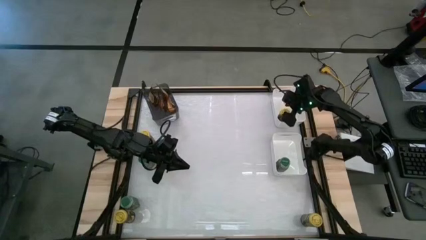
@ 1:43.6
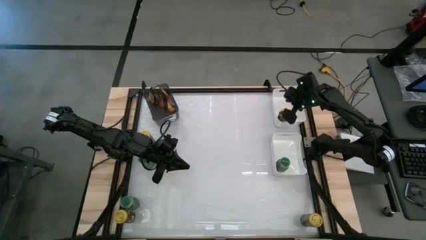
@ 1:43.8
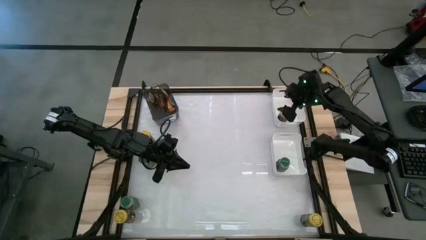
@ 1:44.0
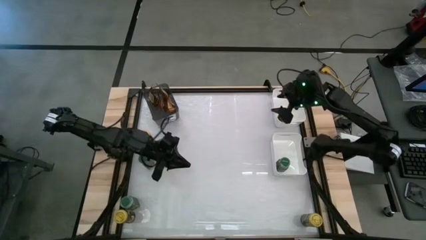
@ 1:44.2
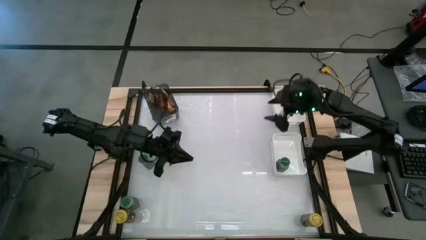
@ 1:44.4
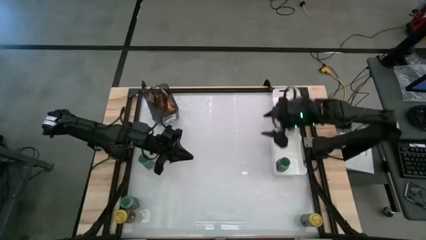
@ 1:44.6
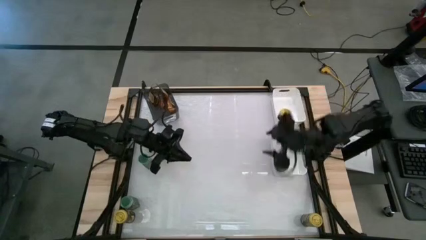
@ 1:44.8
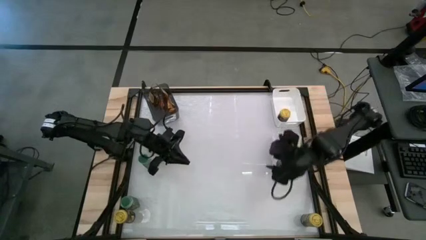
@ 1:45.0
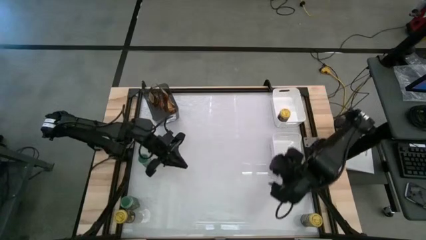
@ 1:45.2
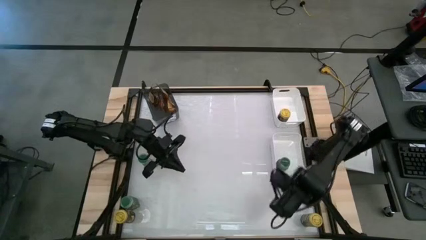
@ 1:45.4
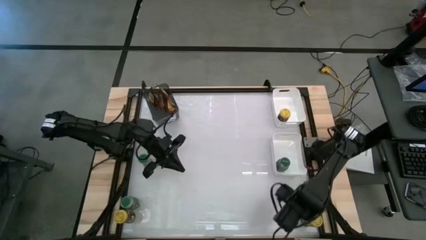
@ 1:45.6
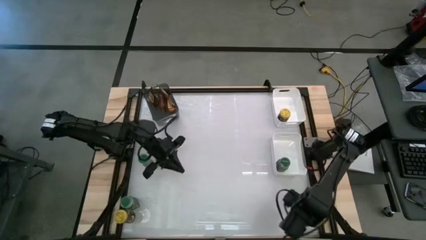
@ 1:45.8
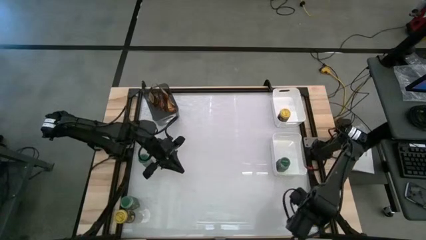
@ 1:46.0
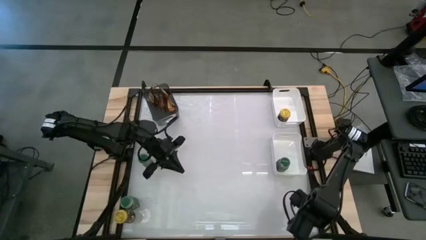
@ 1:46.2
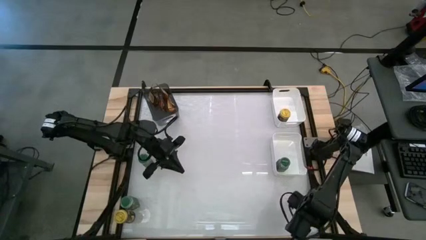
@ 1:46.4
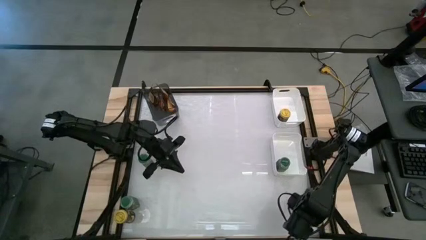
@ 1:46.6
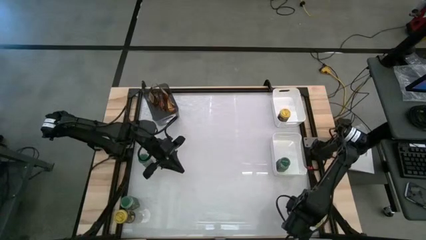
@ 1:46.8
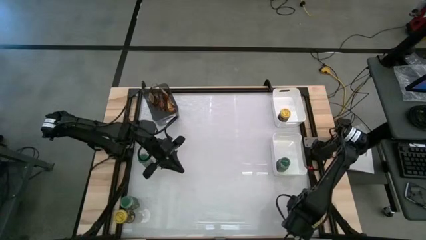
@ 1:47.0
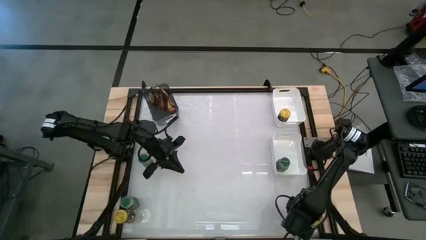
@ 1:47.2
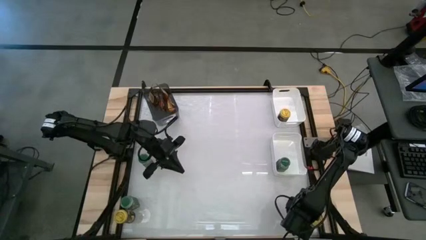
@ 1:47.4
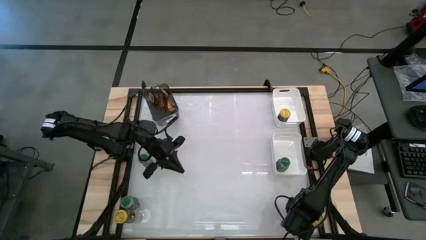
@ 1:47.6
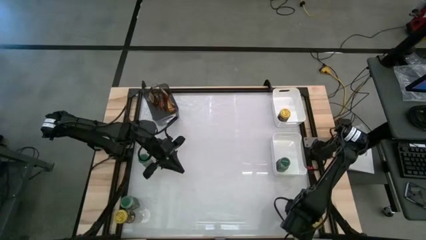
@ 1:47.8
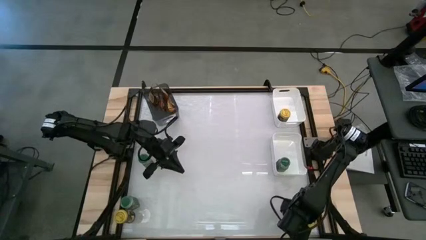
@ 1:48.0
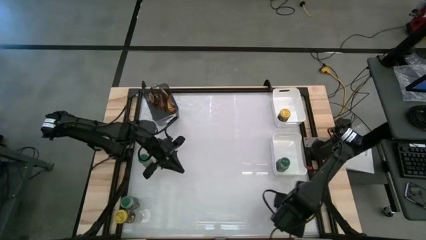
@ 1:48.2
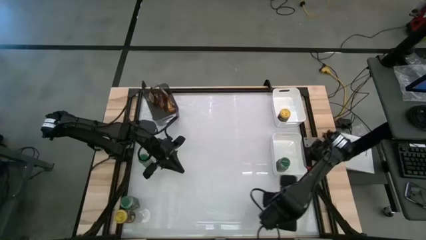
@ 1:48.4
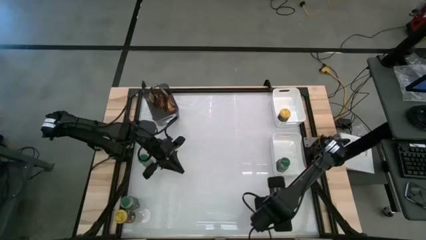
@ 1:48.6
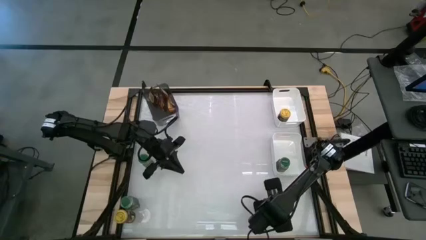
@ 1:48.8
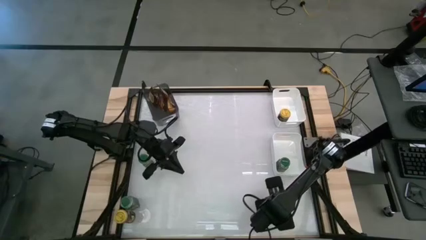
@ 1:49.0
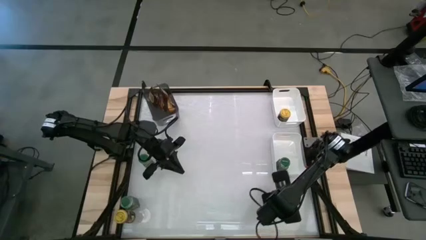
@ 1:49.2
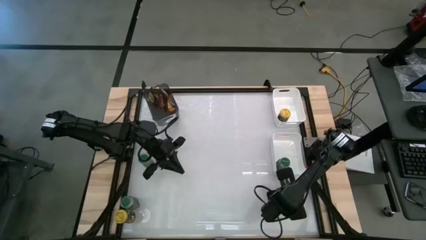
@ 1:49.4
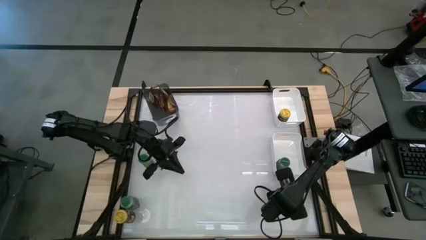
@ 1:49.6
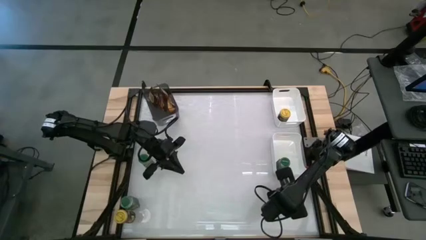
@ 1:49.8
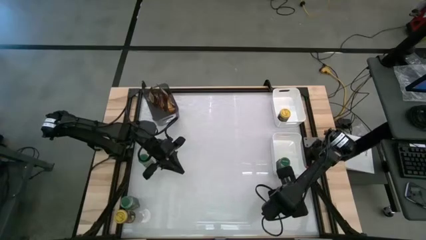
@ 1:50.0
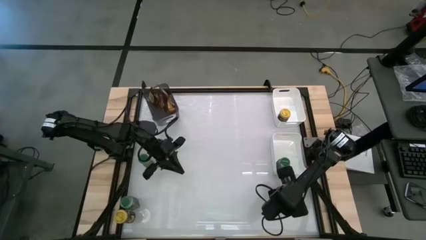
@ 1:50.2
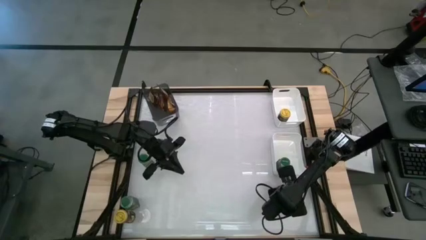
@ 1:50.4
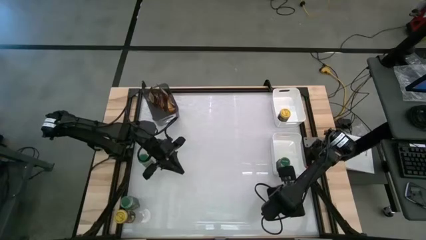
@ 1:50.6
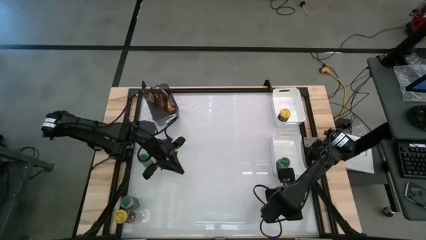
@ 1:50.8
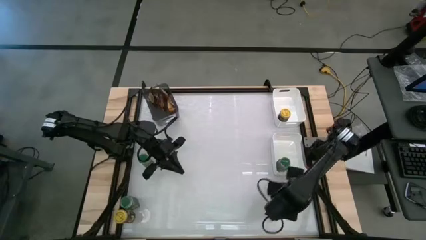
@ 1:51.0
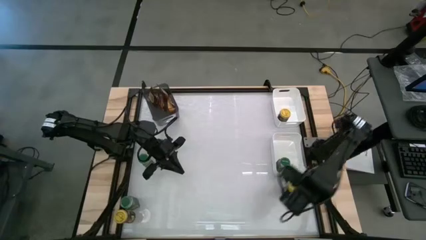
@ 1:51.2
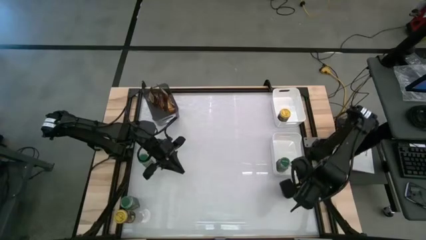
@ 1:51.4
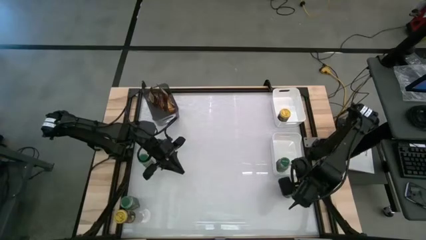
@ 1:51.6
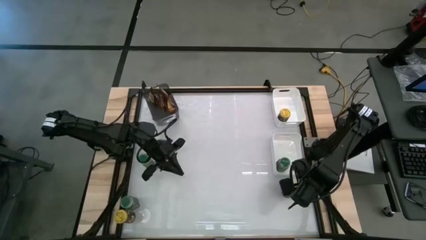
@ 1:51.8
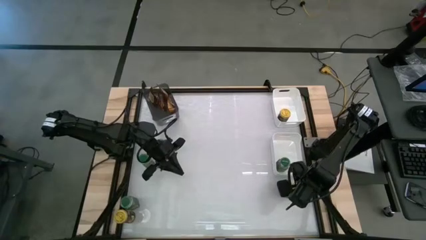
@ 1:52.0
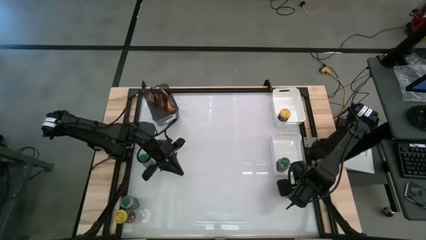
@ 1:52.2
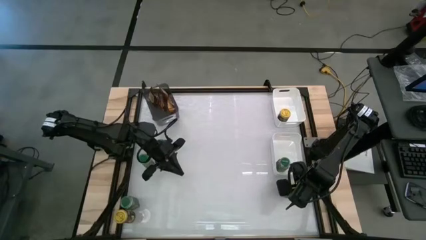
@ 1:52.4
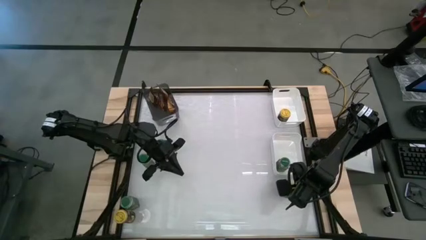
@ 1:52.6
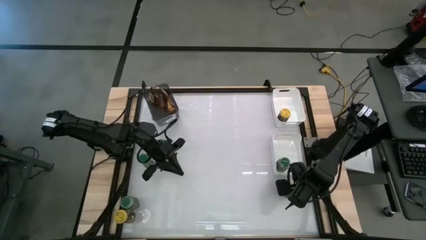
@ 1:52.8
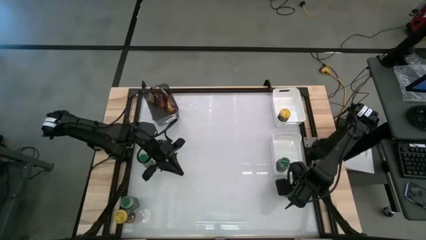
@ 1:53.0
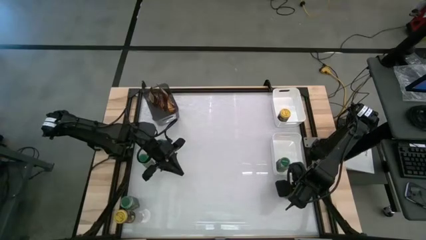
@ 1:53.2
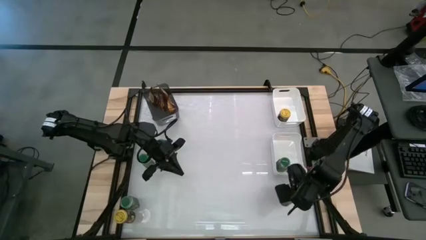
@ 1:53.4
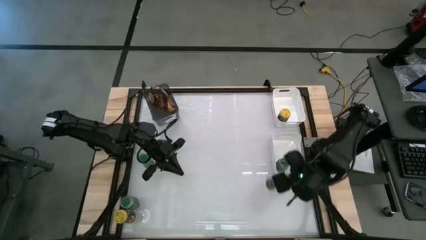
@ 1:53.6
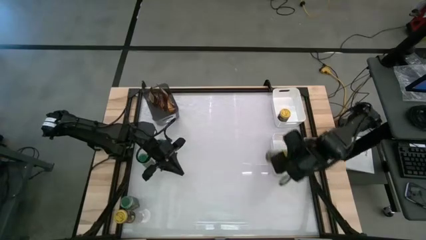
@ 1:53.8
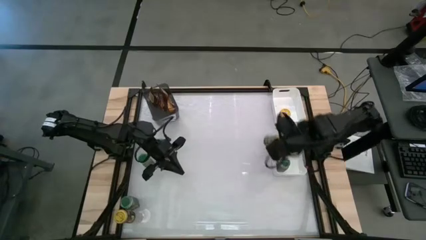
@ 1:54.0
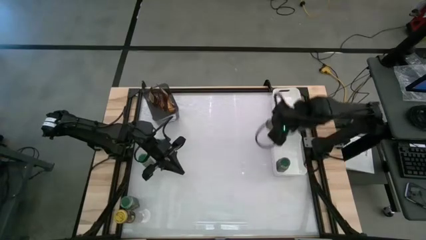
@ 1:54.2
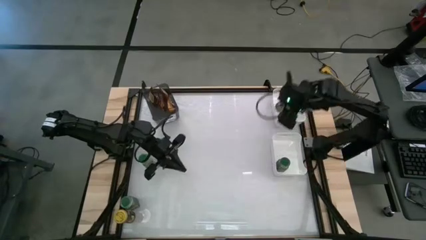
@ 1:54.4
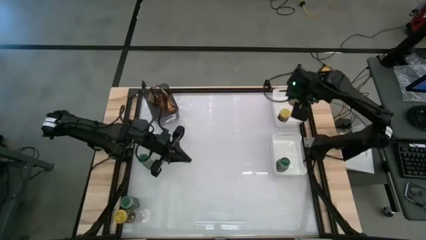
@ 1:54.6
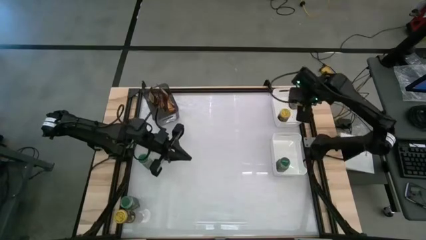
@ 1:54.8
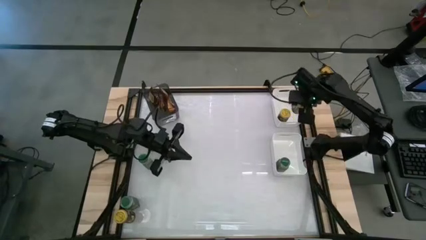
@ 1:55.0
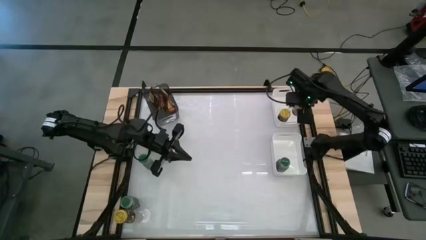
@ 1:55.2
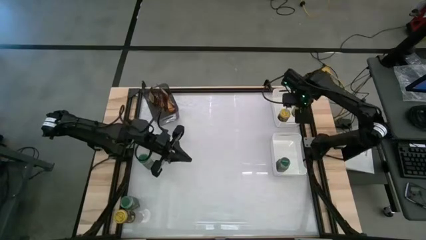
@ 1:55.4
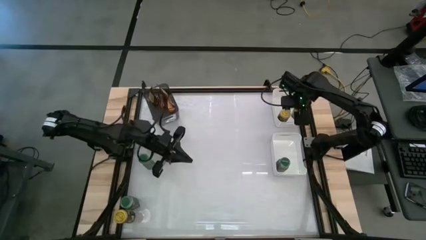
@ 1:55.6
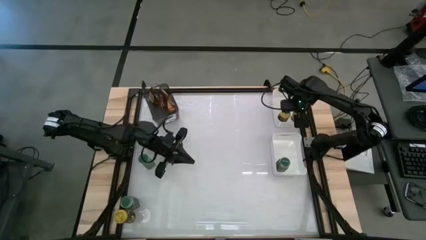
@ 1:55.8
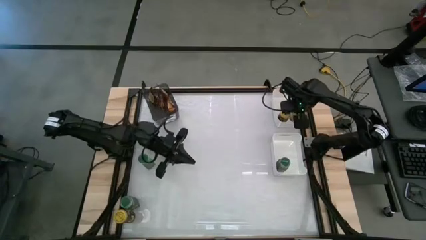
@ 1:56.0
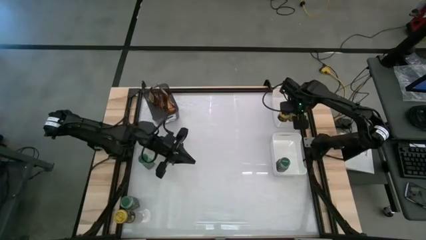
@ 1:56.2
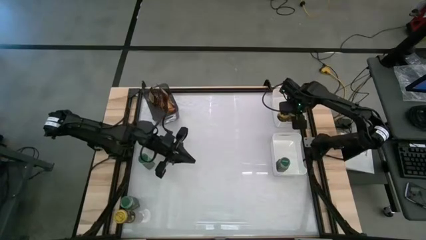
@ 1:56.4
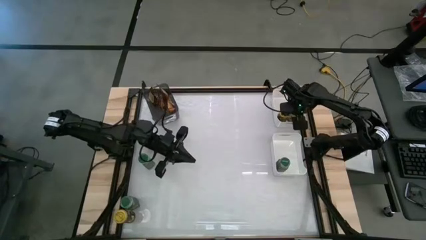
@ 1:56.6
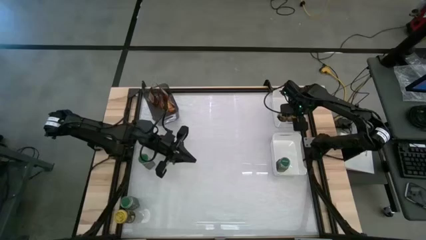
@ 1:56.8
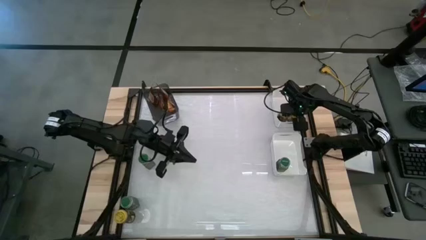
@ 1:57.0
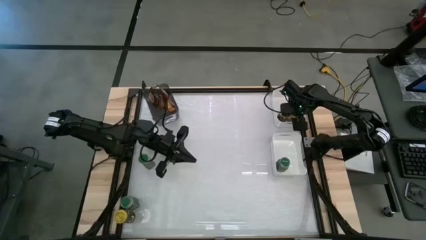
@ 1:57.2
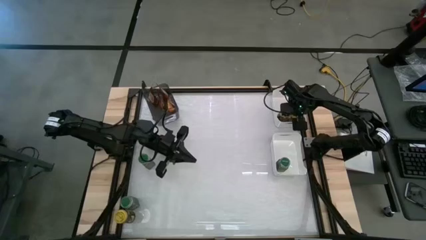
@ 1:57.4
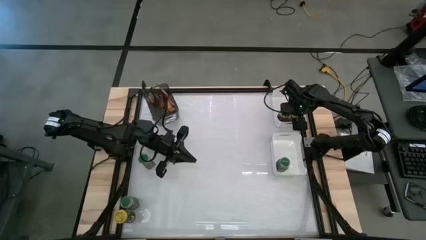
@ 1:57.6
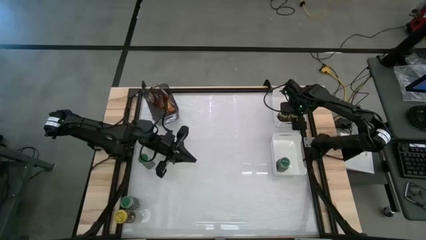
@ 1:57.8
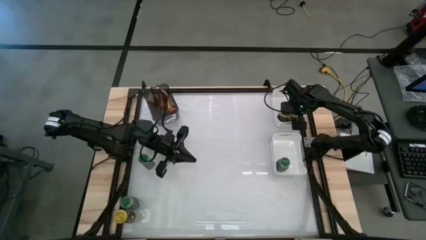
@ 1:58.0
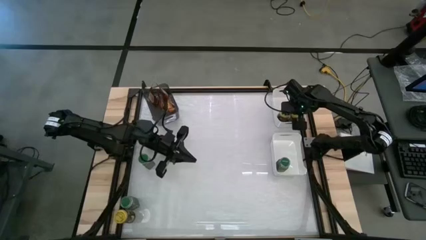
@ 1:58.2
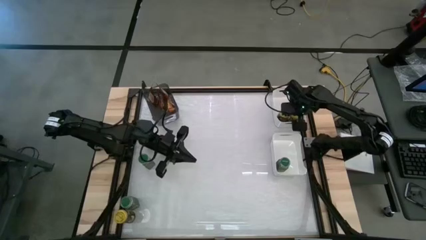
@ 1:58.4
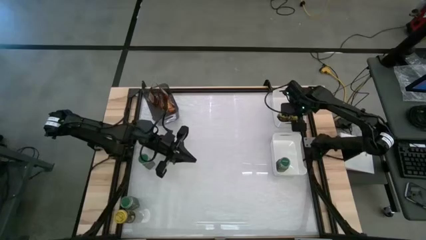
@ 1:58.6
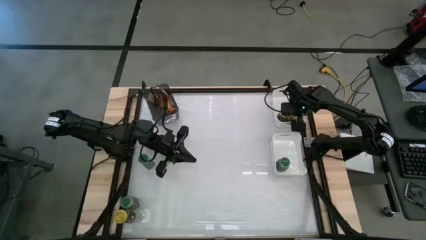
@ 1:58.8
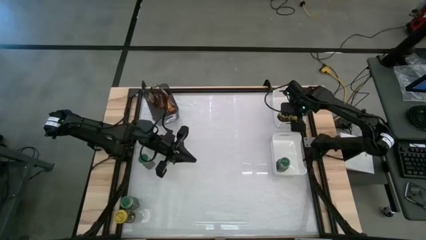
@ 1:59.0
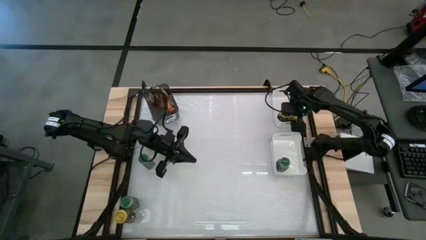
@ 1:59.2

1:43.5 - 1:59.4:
Task: Sort spices by type
Put the yellow seasoning bottle into the top white bin
